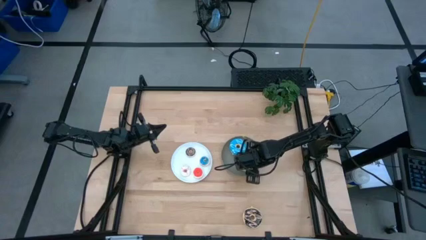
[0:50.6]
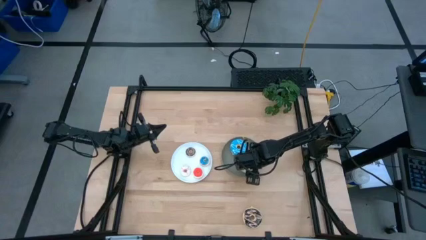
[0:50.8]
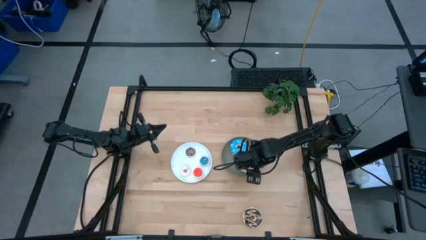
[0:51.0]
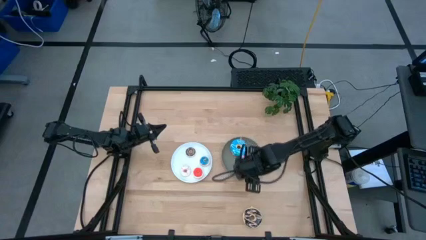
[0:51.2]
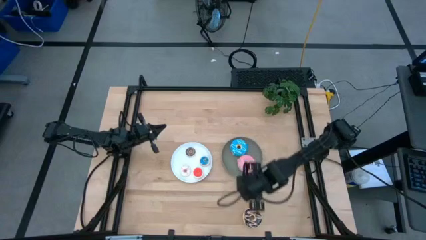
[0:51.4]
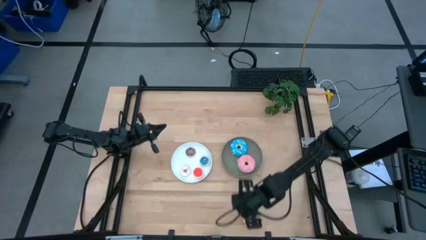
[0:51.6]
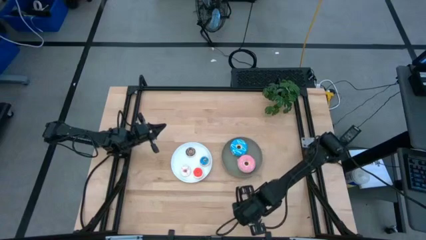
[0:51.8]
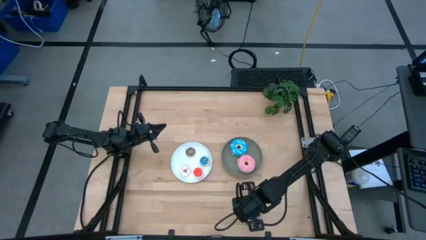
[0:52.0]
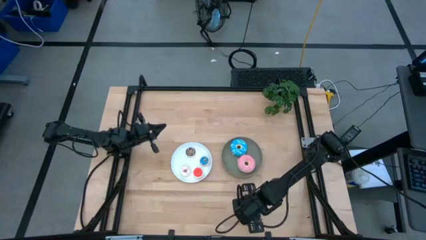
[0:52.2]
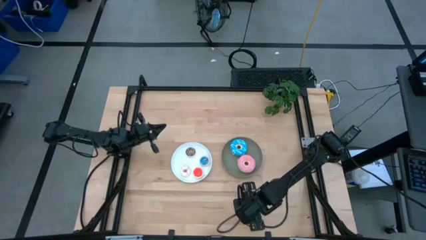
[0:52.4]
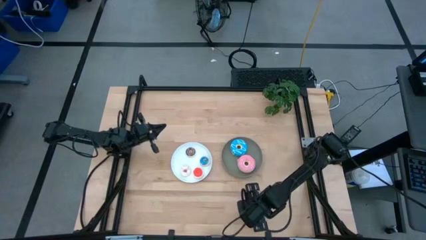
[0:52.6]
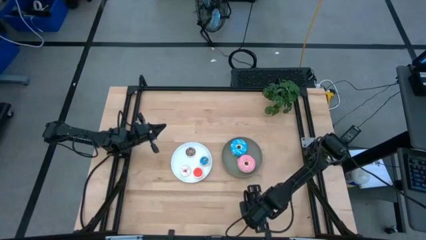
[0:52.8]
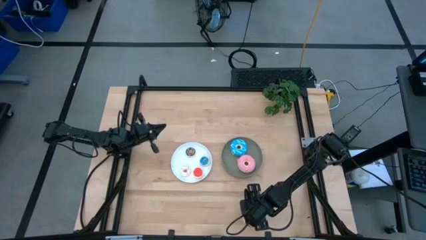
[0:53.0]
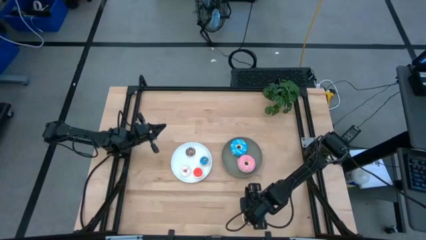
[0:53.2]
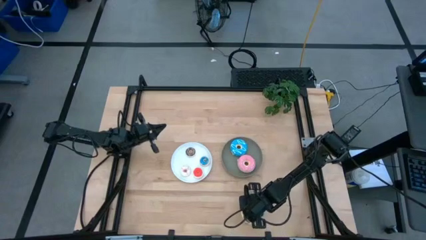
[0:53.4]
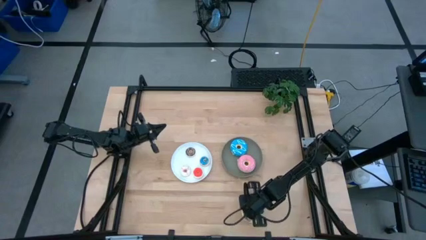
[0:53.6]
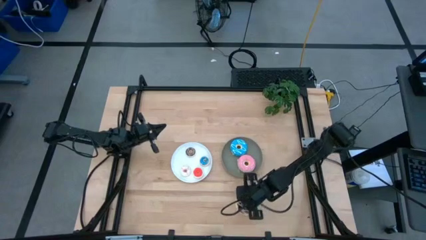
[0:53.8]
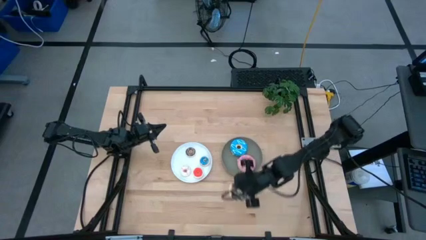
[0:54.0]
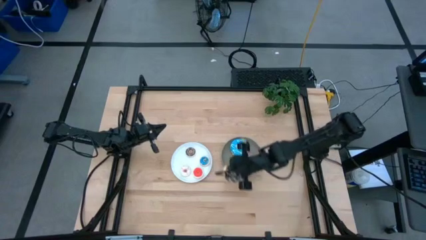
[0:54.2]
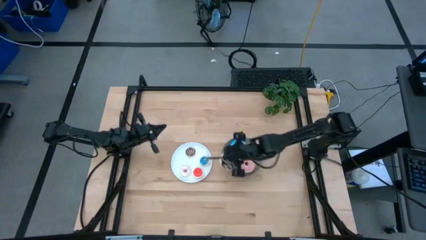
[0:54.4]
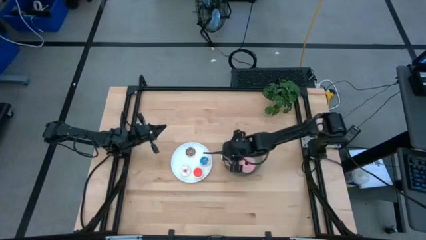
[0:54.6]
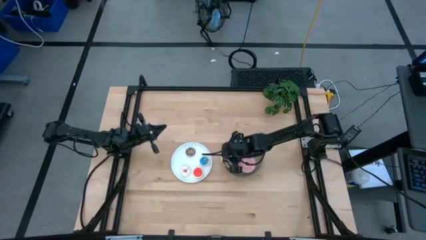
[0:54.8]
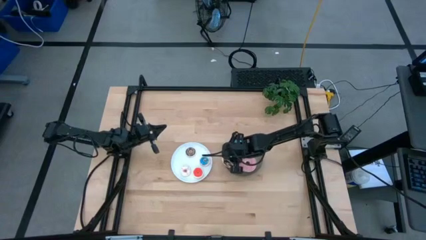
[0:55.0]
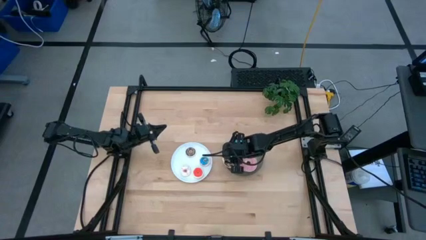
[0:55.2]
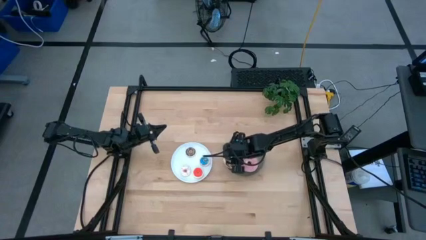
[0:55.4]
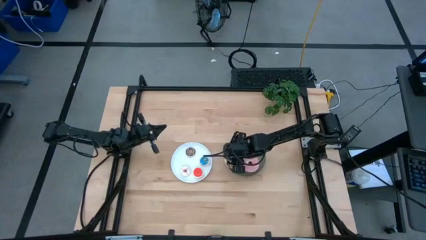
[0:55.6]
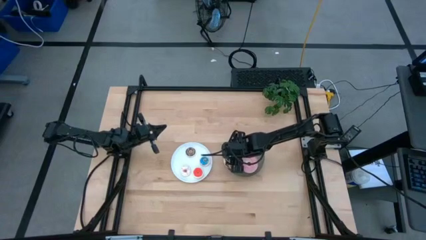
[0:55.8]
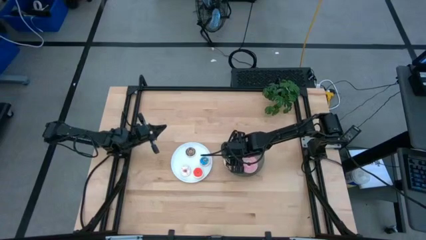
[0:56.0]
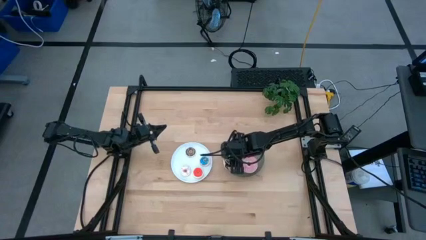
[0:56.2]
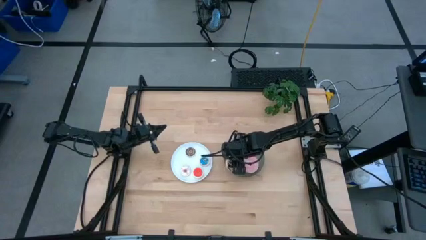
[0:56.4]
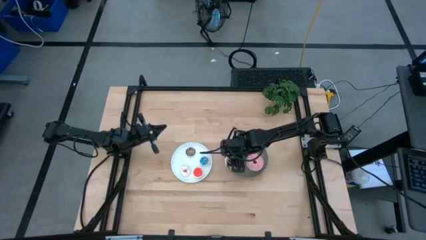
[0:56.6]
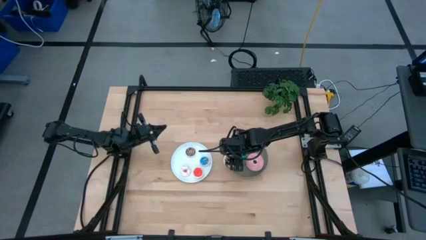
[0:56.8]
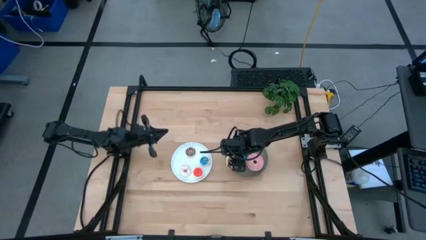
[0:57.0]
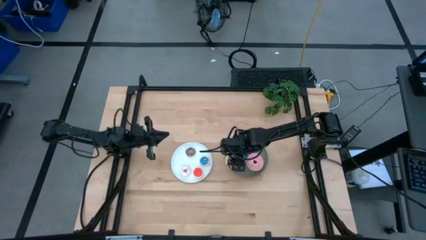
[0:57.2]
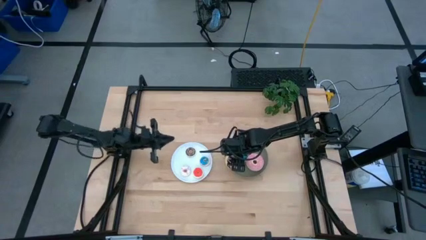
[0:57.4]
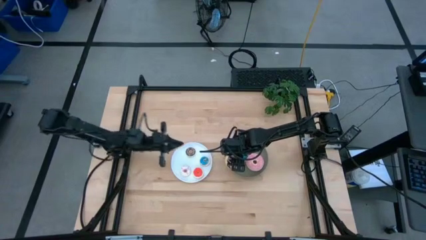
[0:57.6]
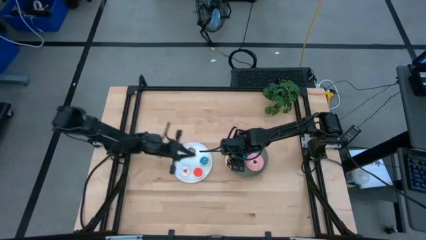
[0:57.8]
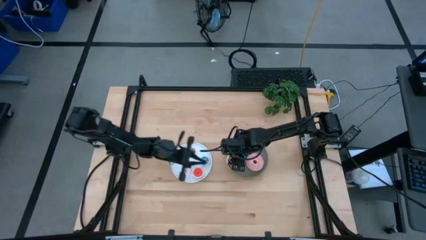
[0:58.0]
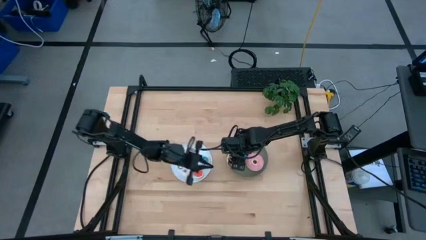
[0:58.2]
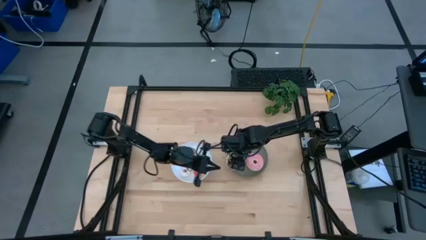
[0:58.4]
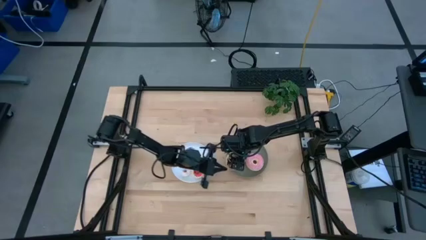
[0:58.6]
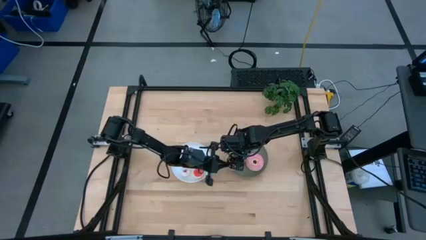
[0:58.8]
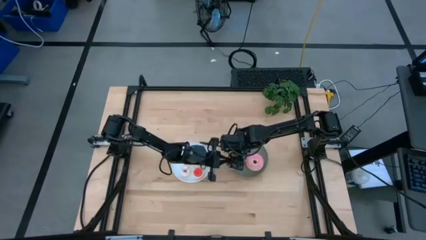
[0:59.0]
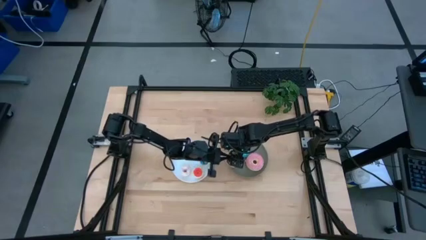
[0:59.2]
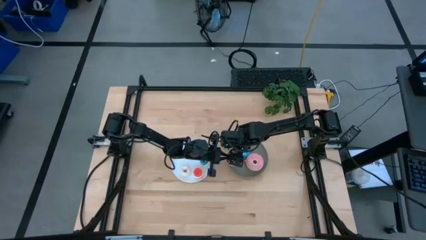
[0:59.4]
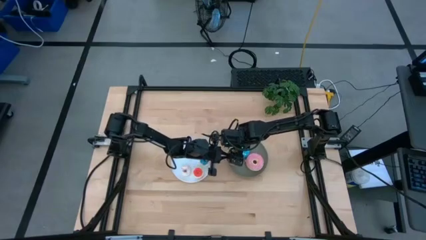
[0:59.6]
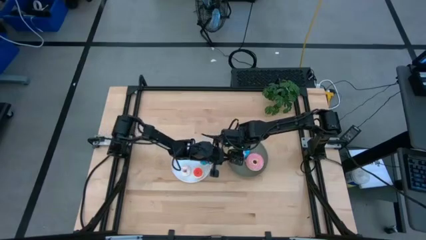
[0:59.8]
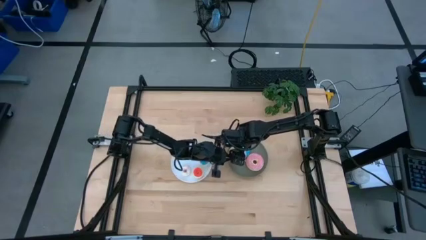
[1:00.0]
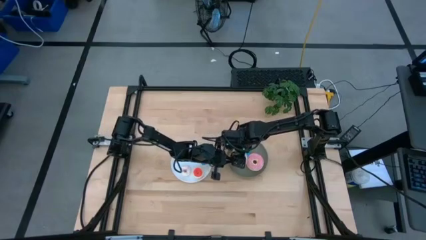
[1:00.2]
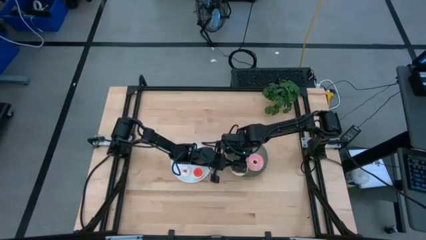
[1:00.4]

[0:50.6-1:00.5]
Task: Pick & Place donuts
Put the large black donut on the gray plate

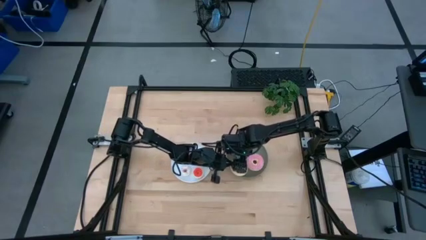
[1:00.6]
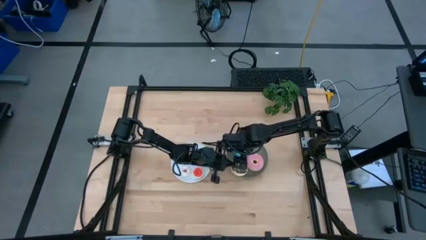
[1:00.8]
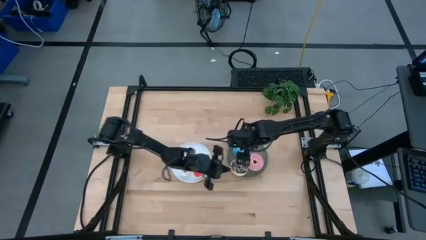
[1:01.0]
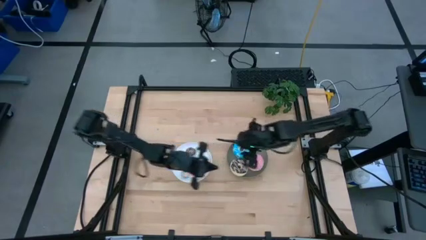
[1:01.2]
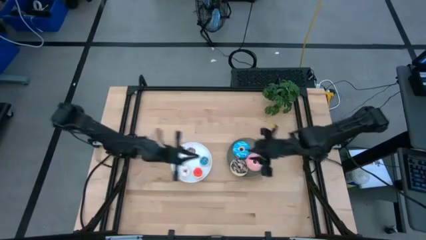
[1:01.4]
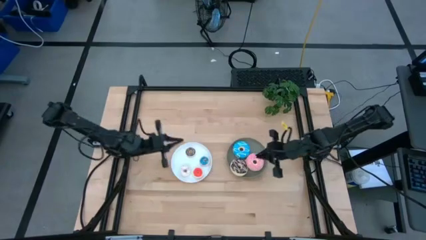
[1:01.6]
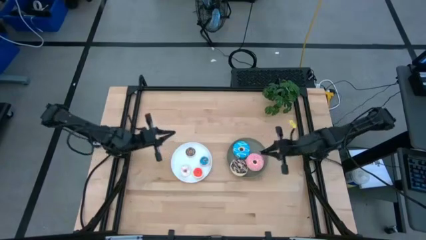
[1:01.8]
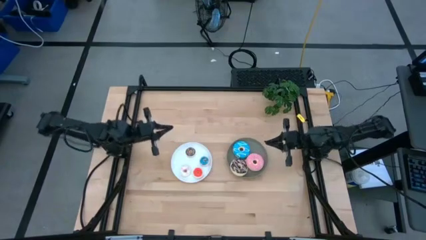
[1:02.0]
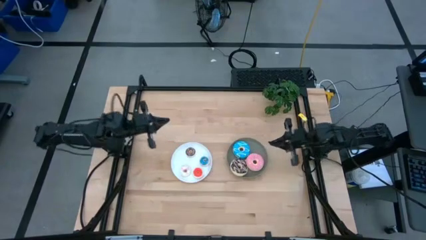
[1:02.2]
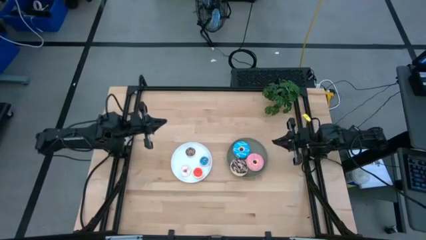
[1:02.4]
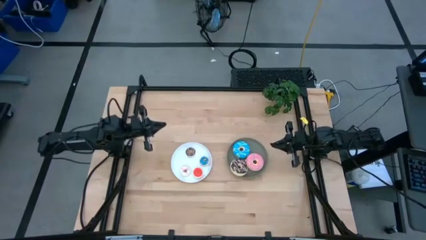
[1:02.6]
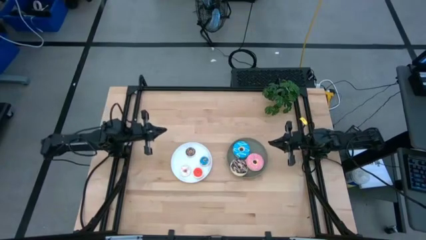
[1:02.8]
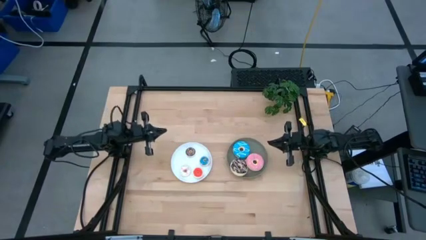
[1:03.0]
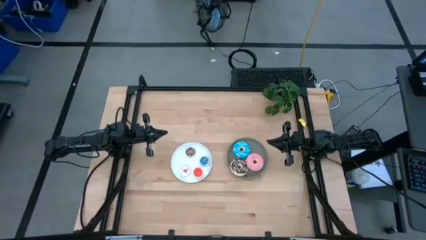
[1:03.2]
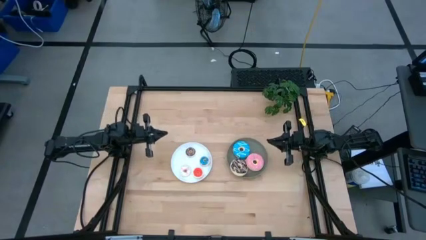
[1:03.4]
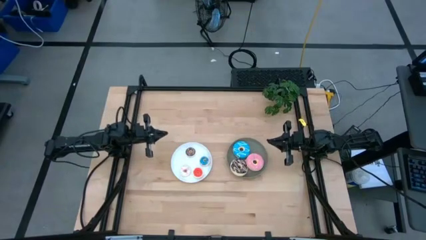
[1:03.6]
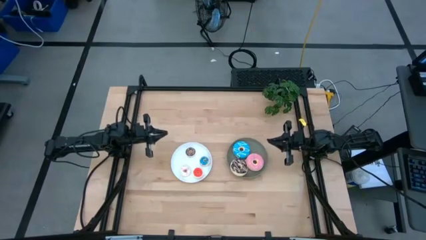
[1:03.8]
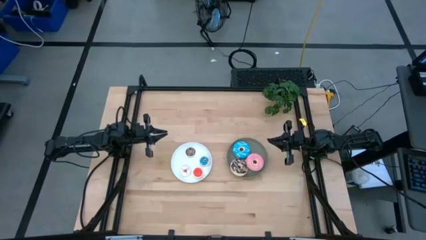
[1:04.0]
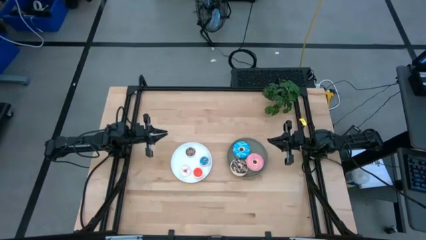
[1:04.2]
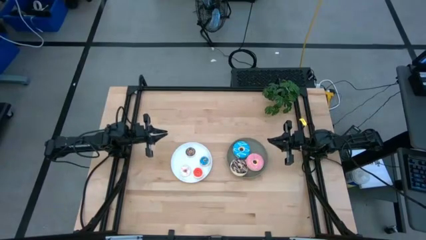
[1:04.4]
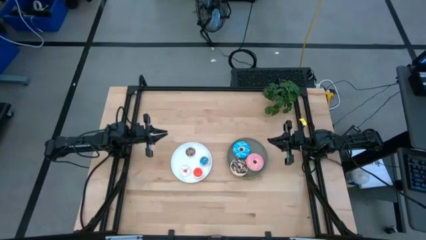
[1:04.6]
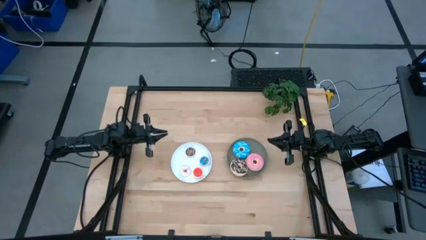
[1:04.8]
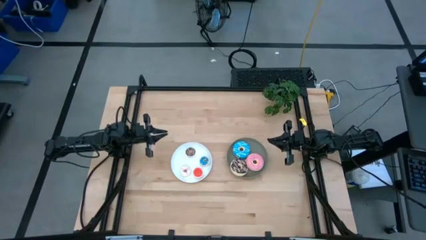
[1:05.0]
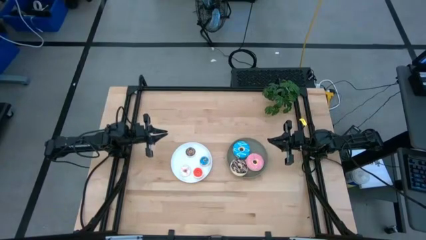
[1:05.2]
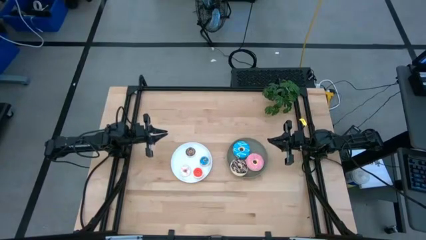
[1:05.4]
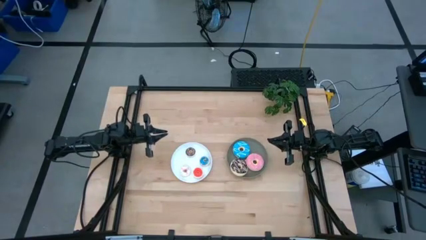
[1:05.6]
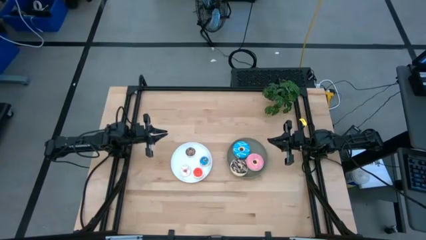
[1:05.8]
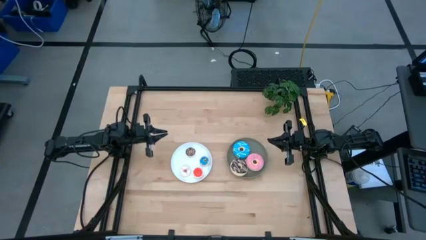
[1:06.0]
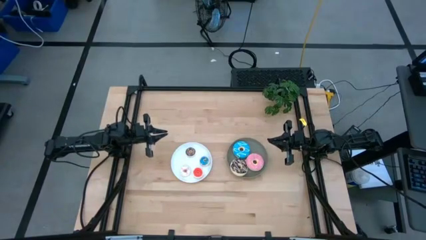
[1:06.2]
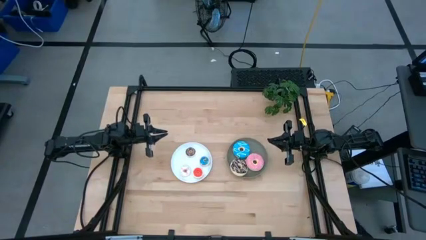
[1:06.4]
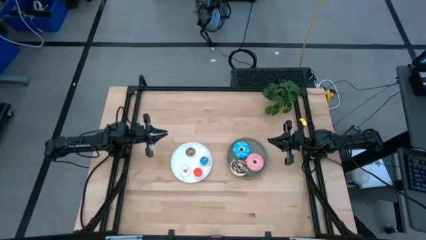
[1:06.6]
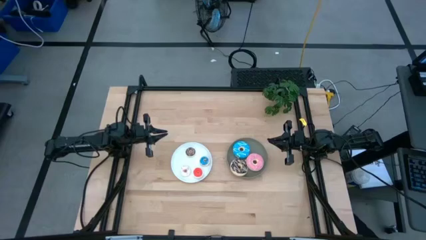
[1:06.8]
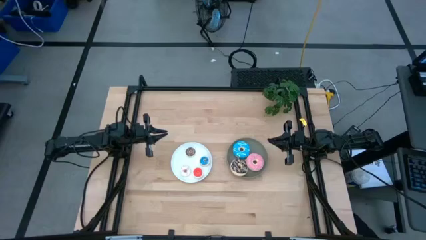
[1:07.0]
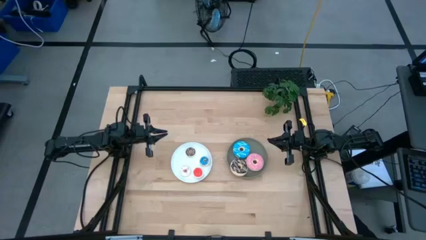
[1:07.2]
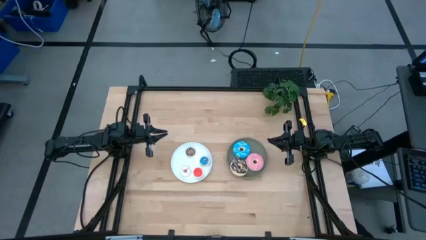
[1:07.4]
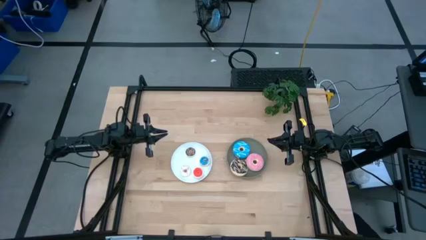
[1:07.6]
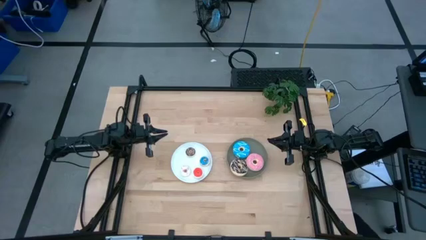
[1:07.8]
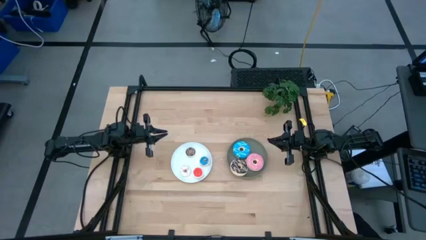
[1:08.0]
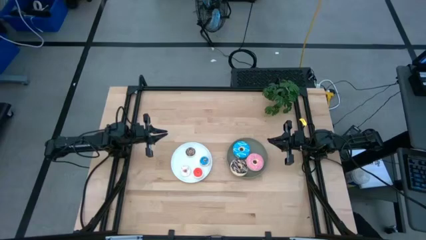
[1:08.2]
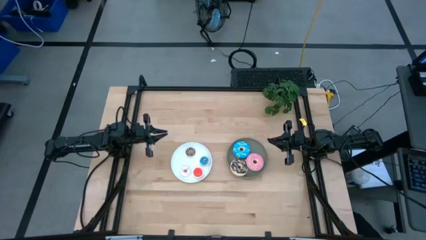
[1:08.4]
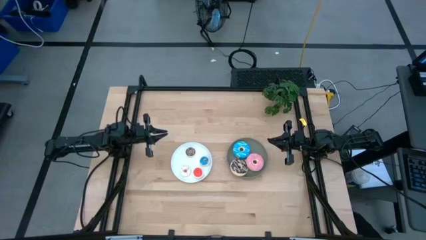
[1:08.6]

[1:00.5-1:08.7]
Return to Home Position
